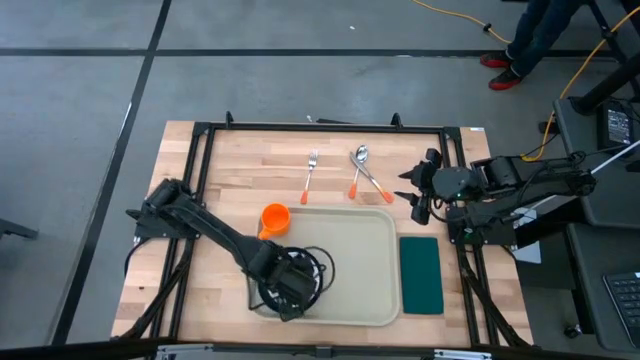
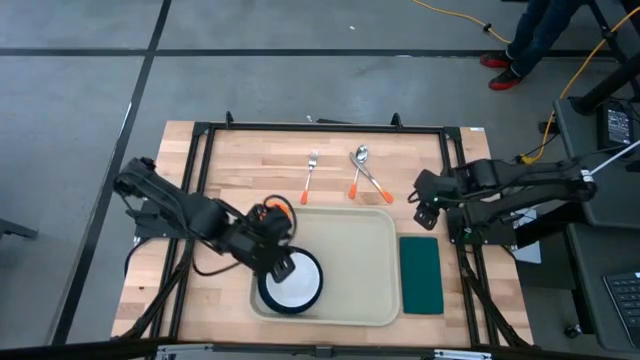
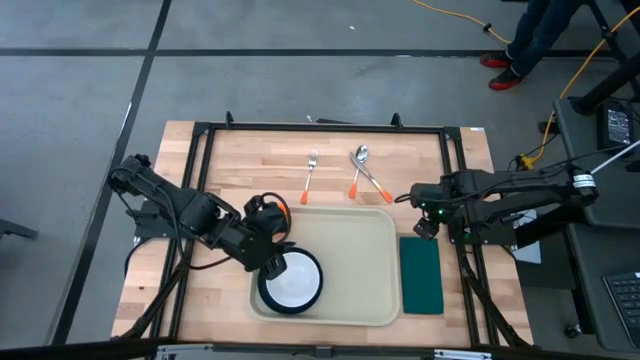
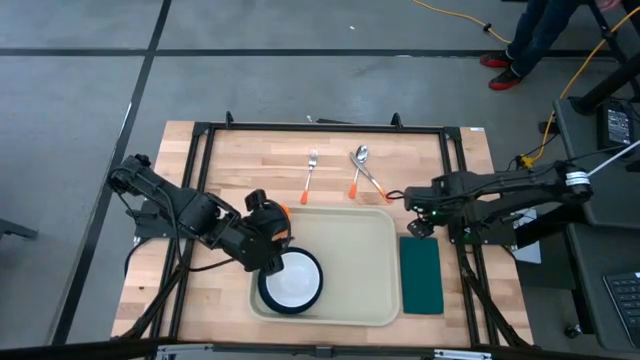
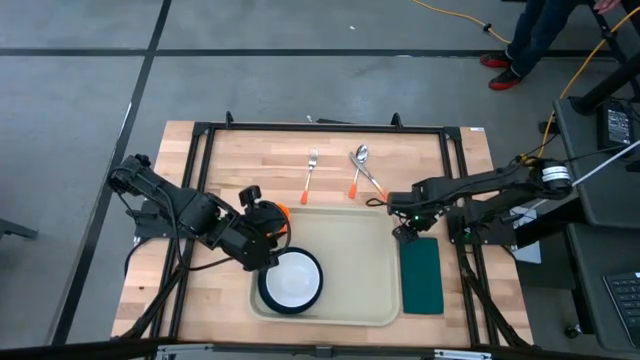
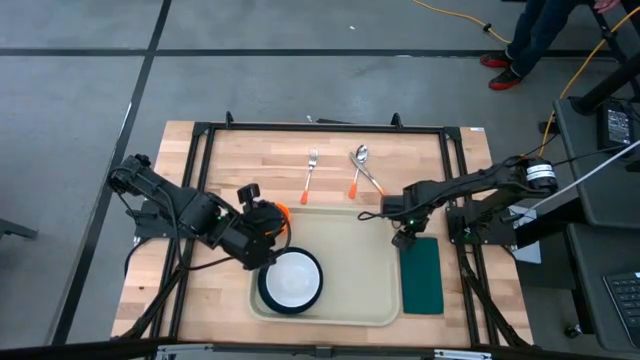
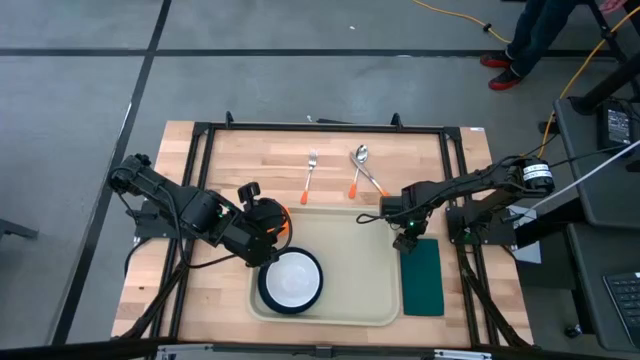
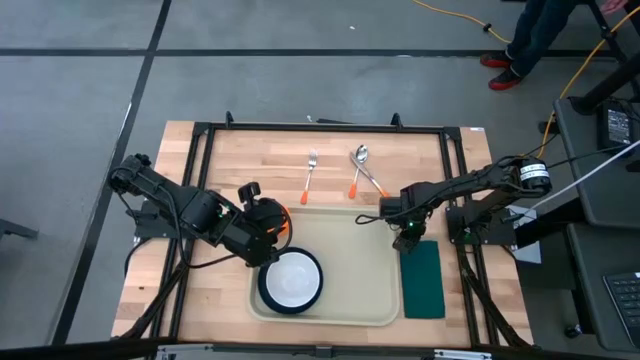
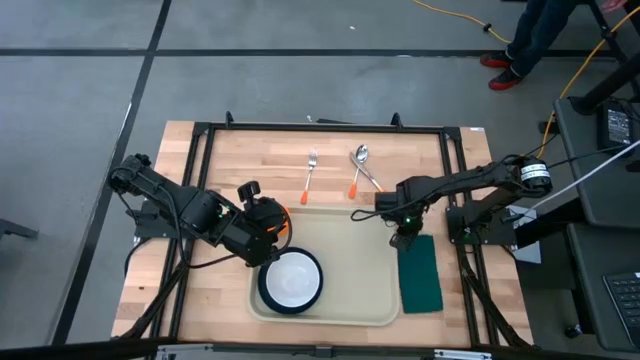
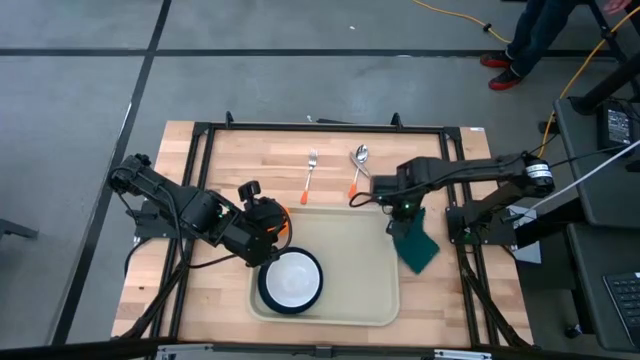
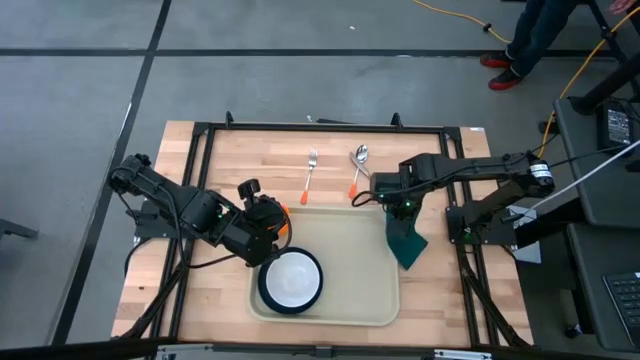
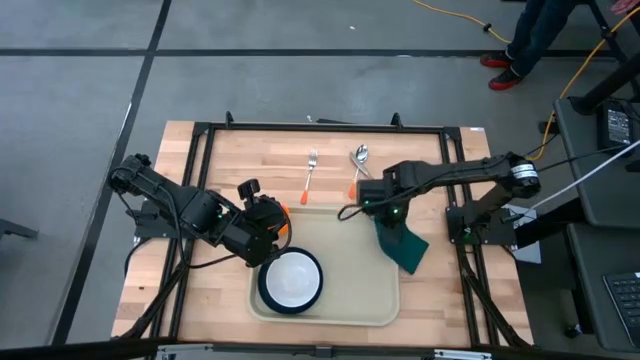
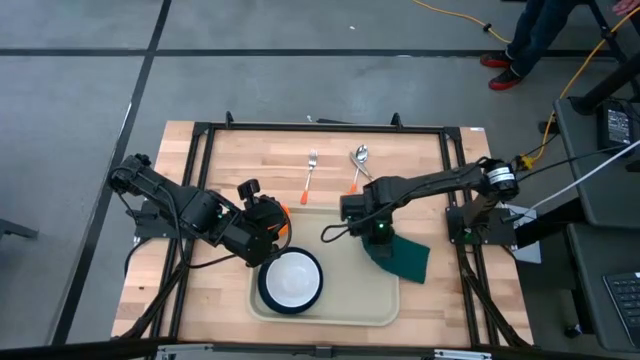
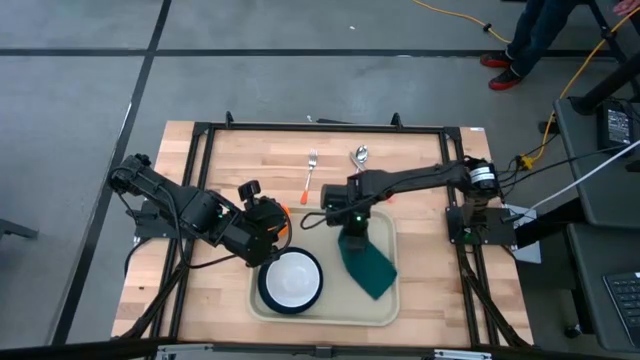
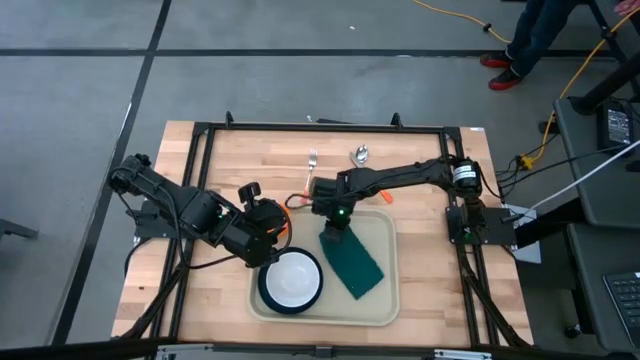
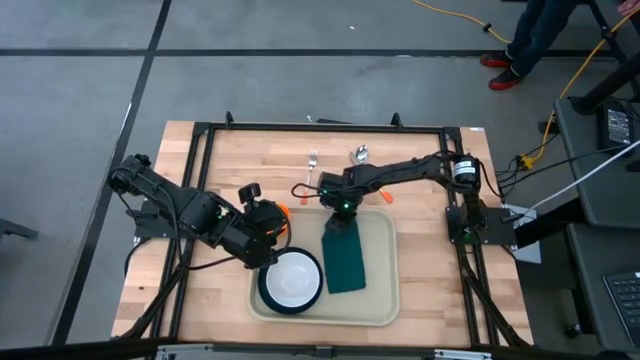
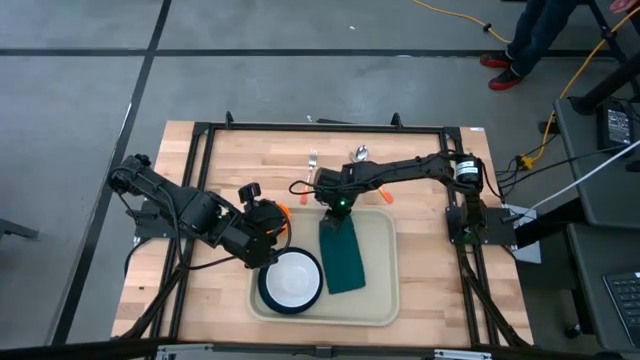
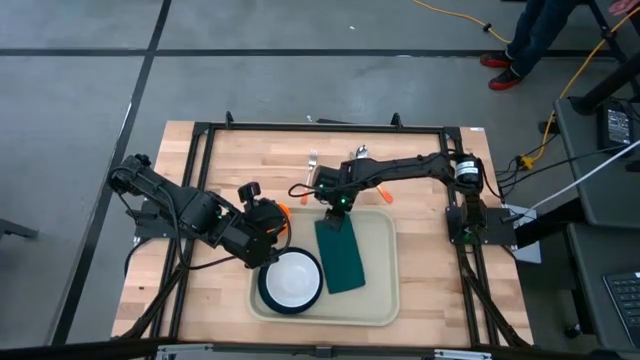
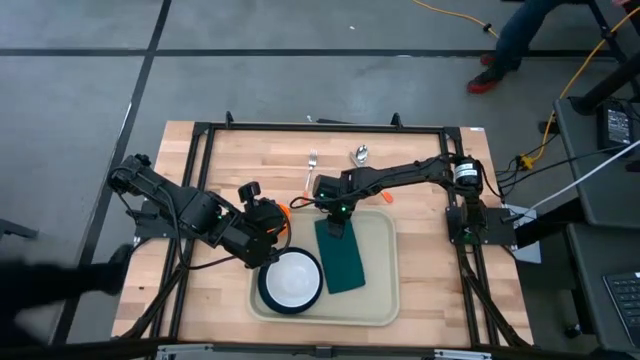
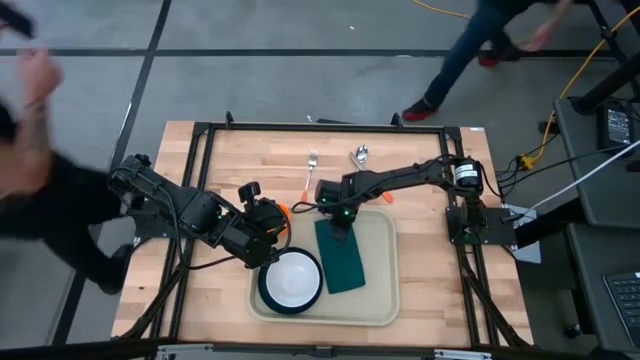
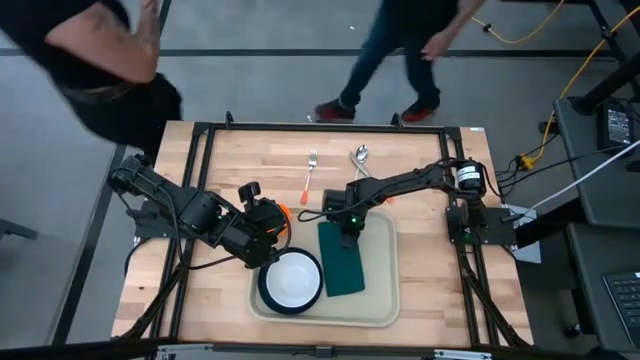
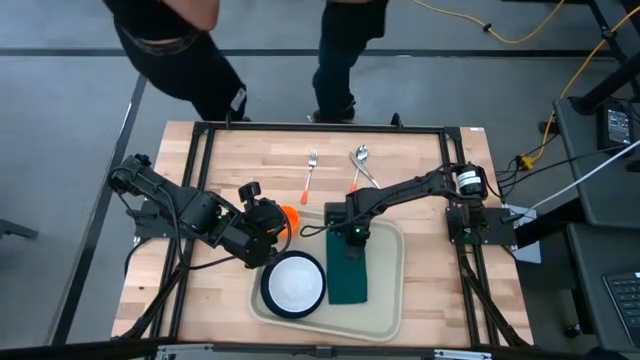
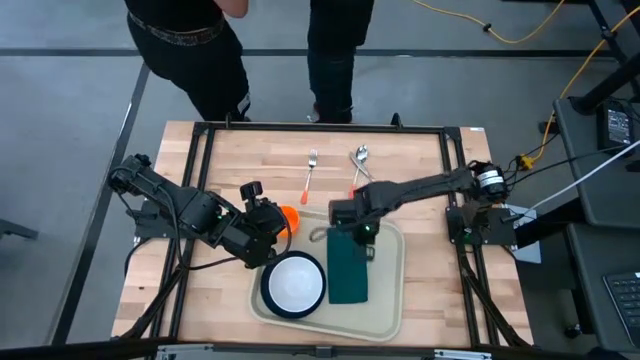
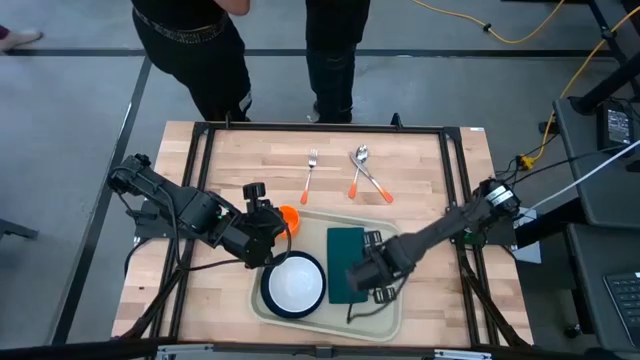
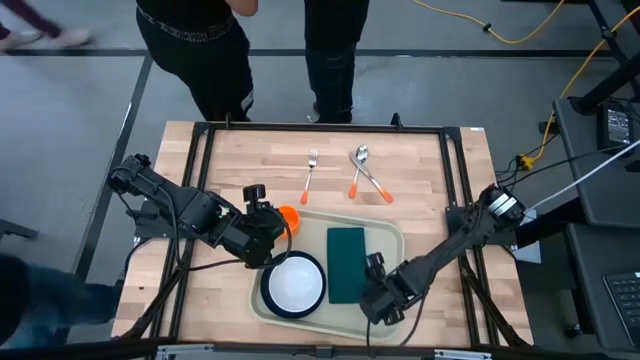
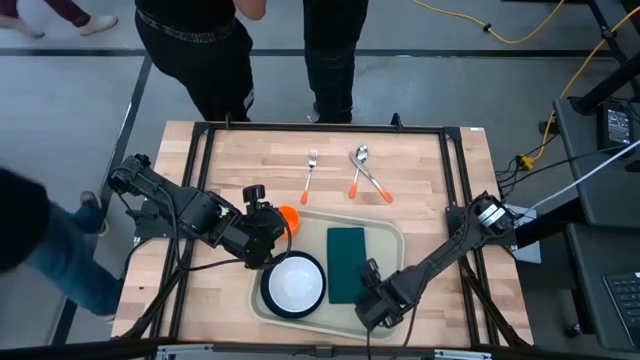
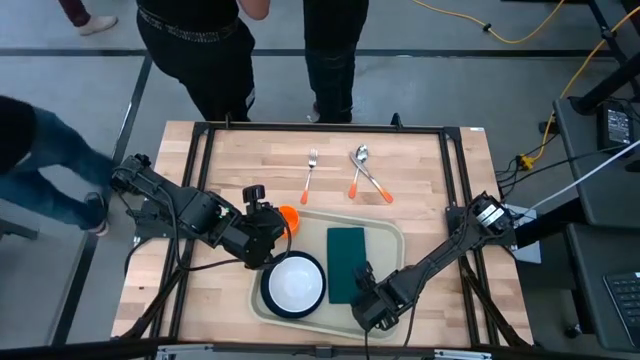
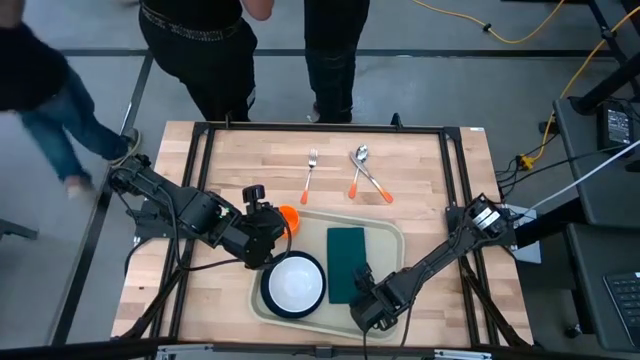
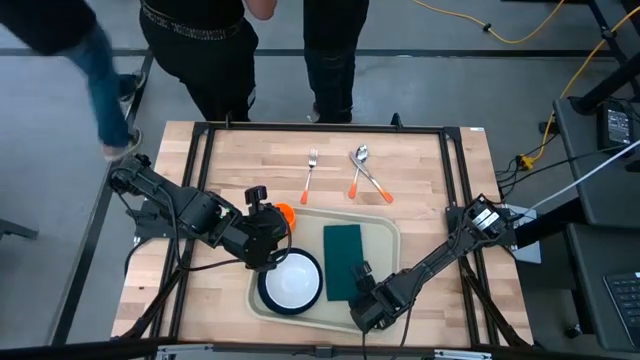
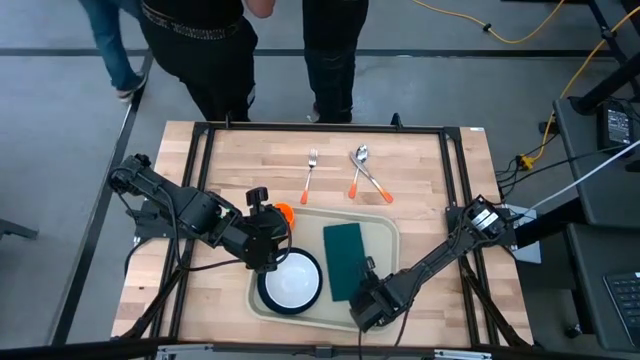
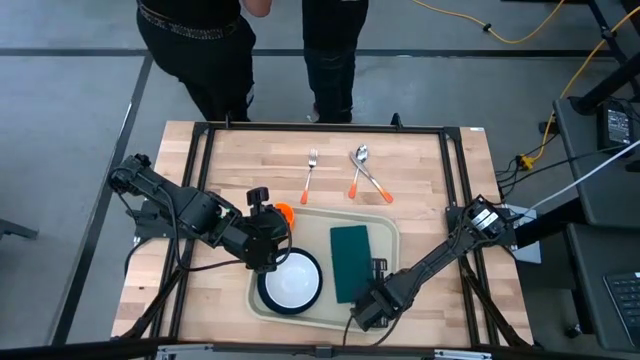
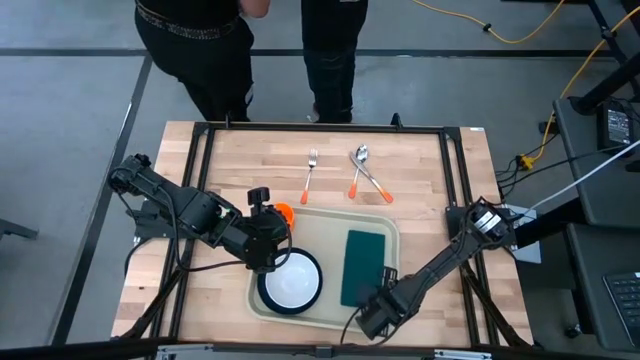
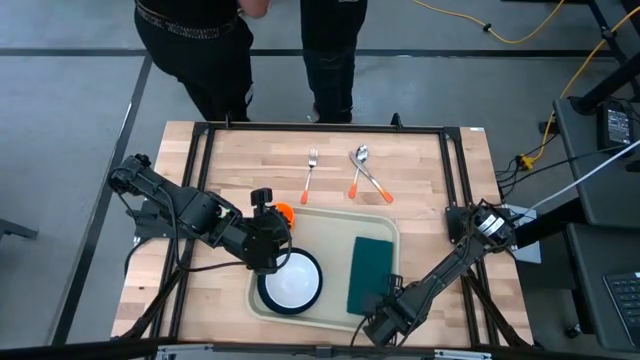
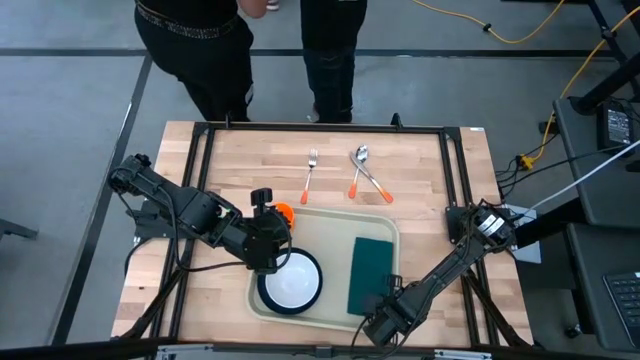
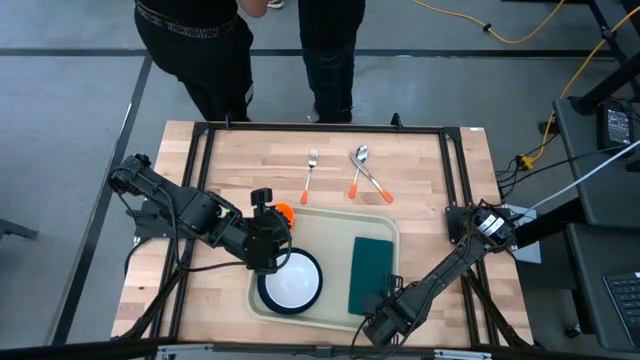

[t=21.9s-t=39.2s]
Task: Set up tray
Put the dark green napkin on the right of the brown tray

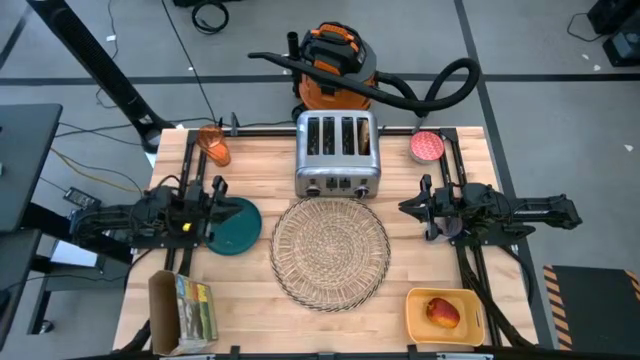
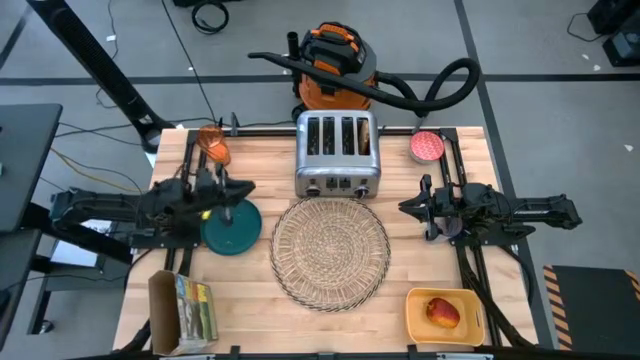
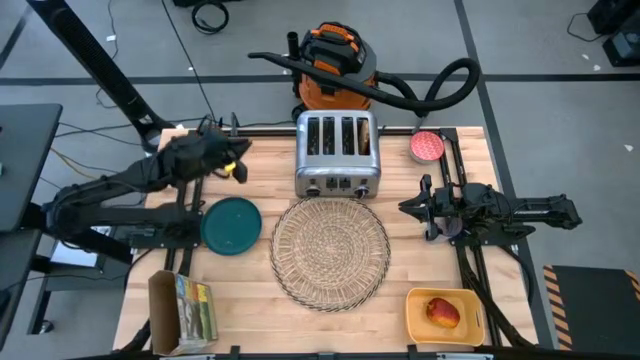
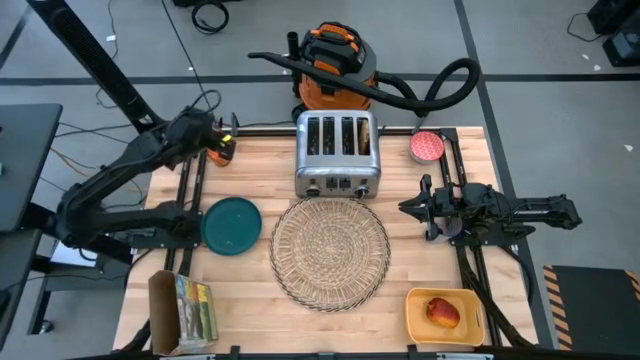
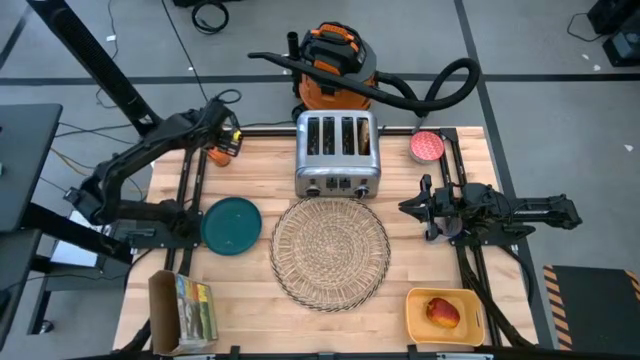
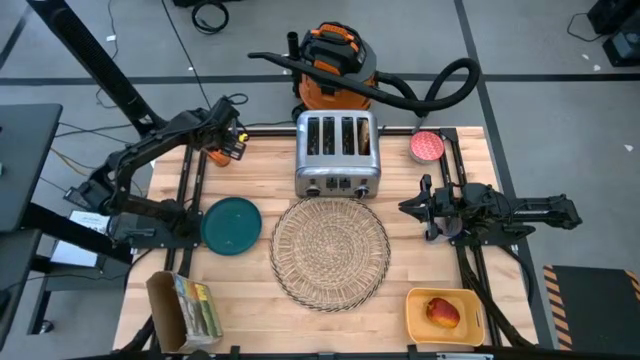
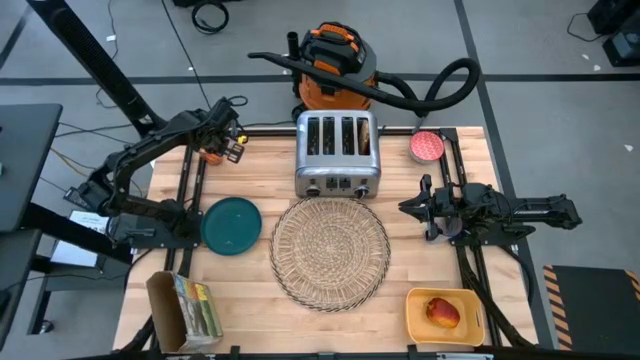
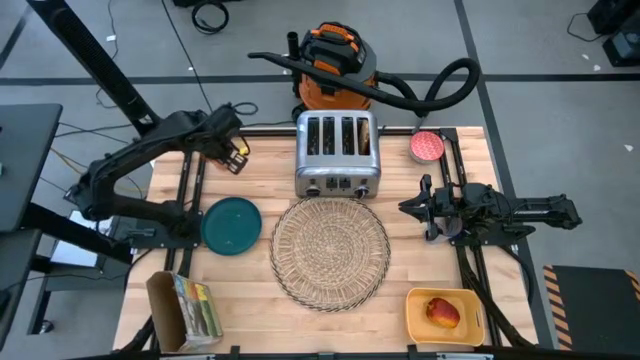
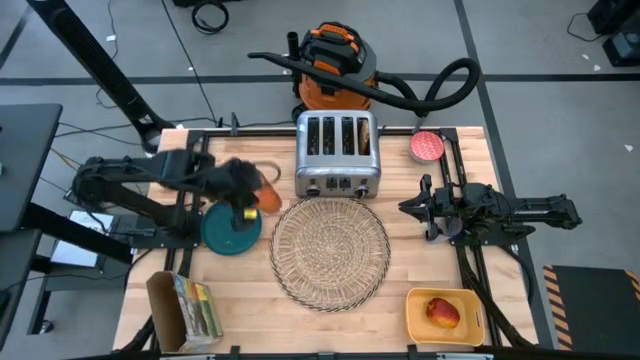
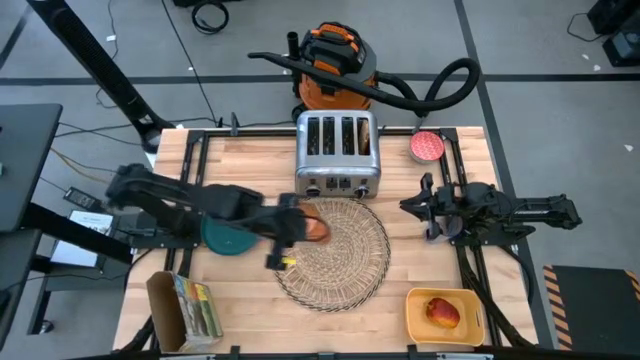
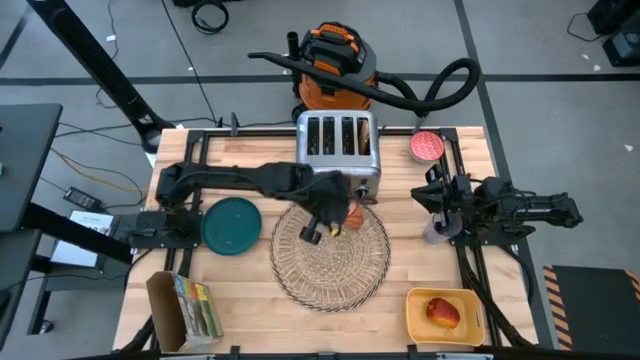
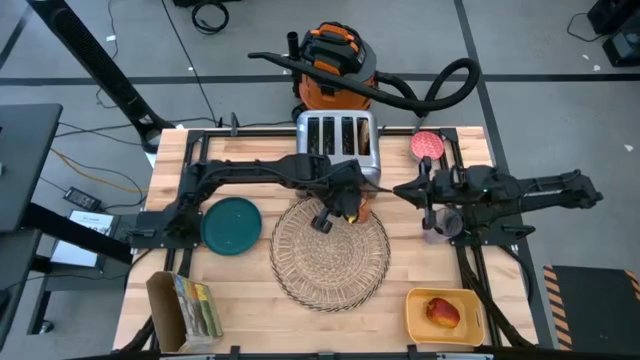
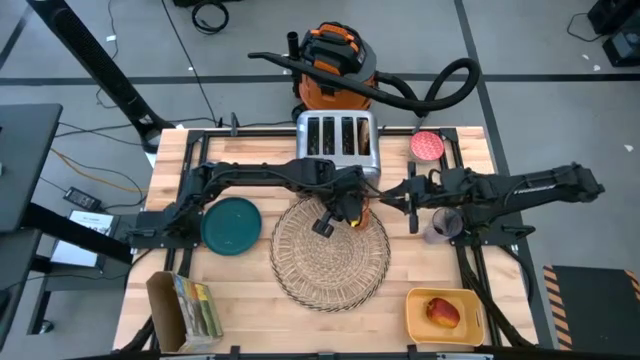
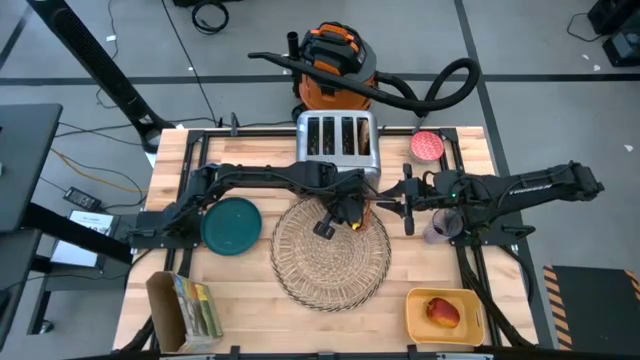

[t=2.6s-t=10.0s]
Task: Arrange a breakfast setting
Put the orange glass of milk on the top right of the brown placemat
